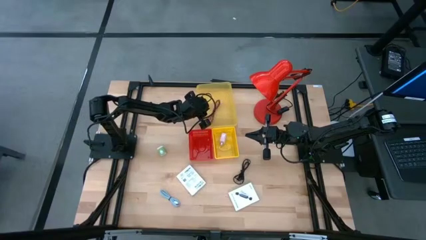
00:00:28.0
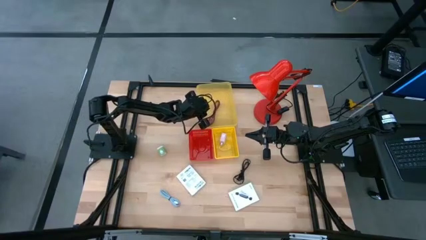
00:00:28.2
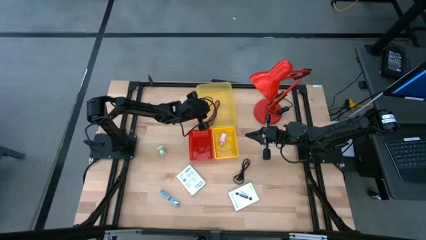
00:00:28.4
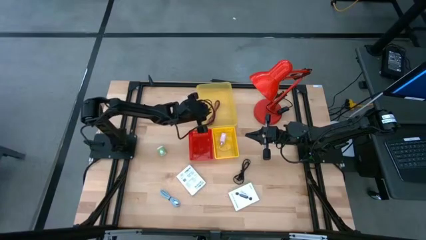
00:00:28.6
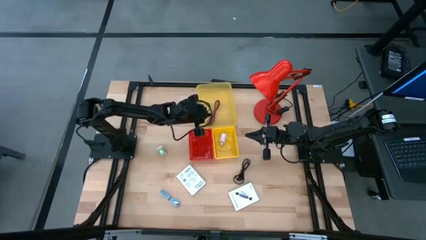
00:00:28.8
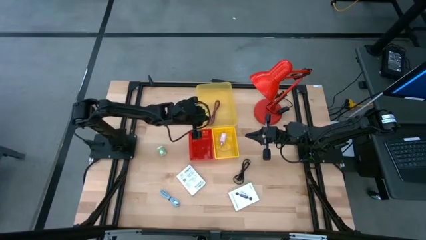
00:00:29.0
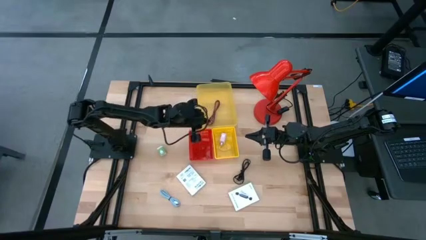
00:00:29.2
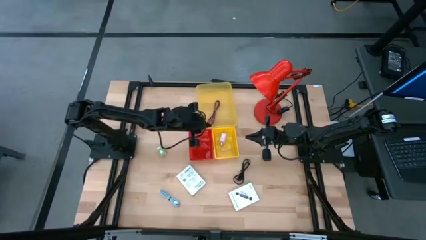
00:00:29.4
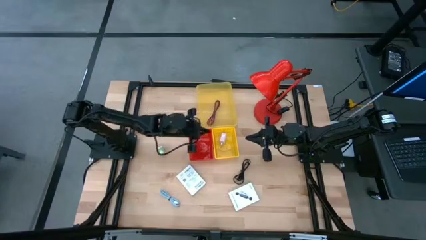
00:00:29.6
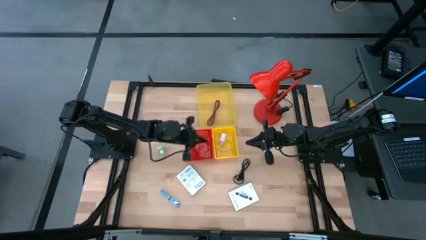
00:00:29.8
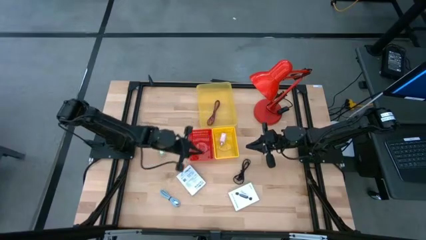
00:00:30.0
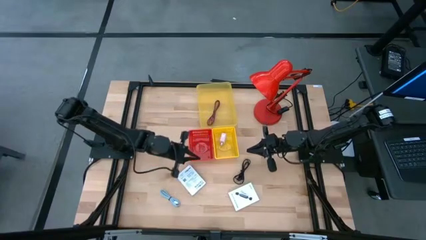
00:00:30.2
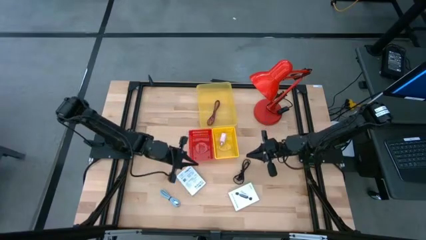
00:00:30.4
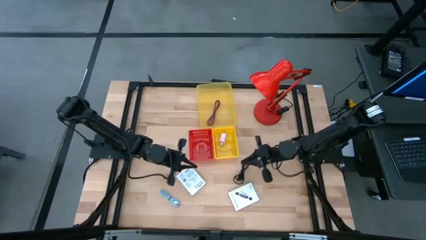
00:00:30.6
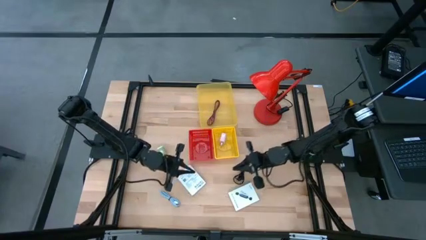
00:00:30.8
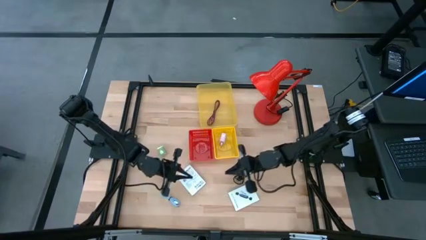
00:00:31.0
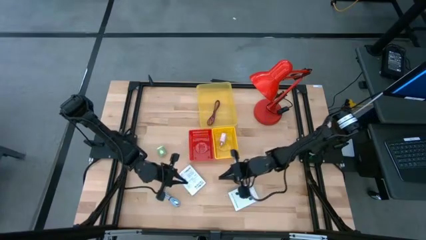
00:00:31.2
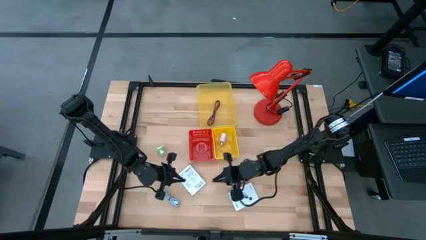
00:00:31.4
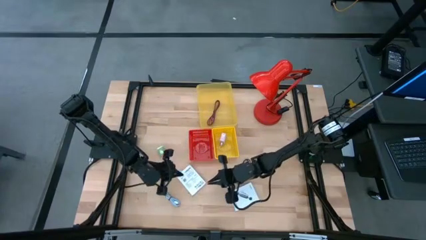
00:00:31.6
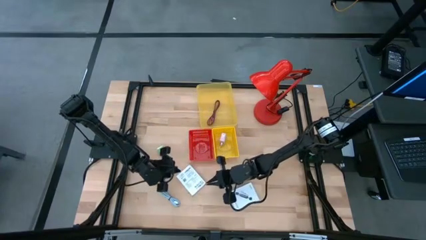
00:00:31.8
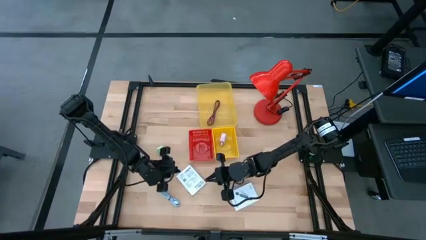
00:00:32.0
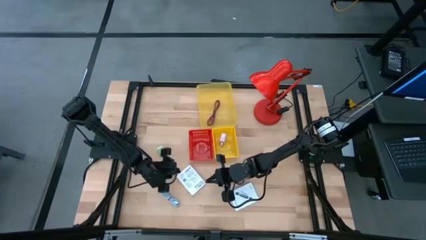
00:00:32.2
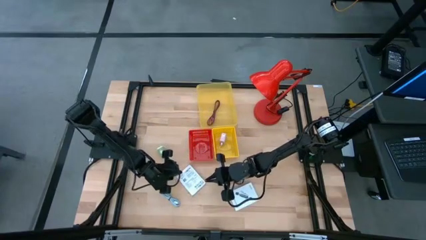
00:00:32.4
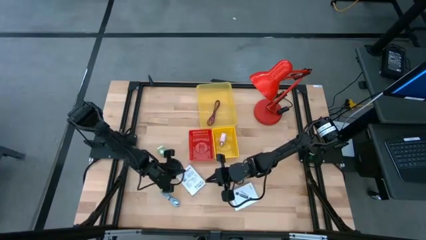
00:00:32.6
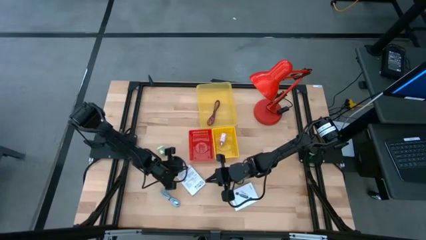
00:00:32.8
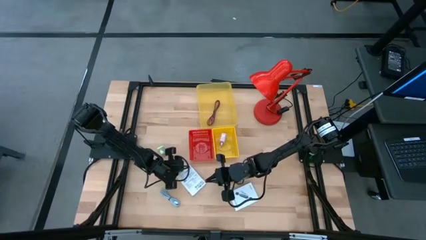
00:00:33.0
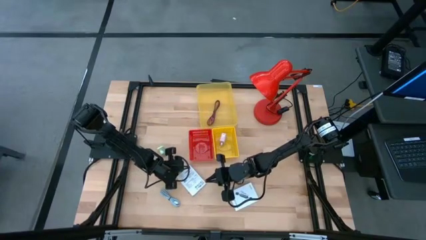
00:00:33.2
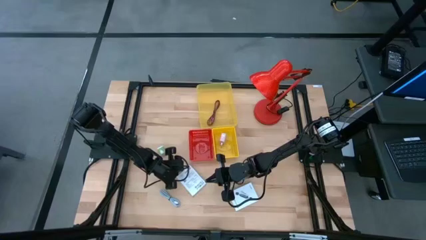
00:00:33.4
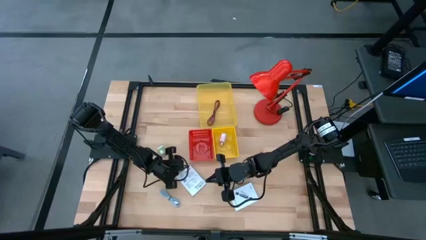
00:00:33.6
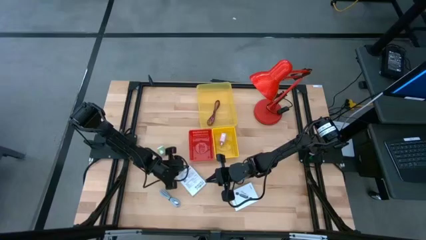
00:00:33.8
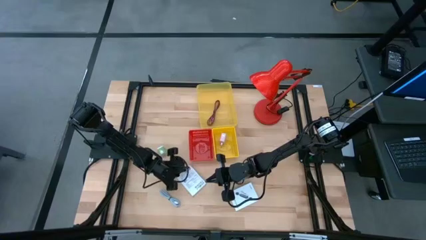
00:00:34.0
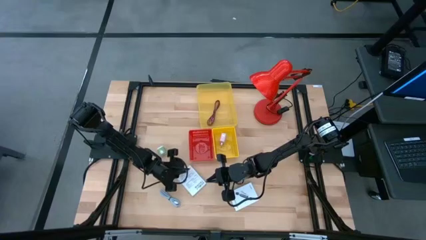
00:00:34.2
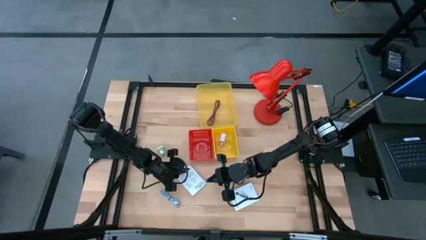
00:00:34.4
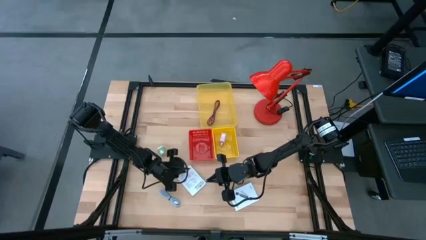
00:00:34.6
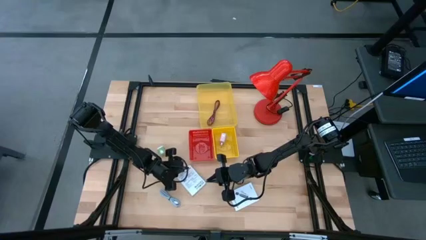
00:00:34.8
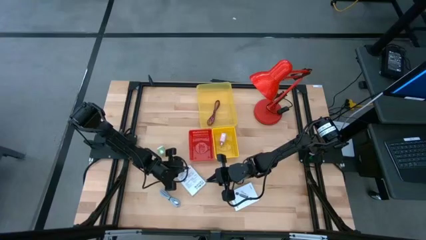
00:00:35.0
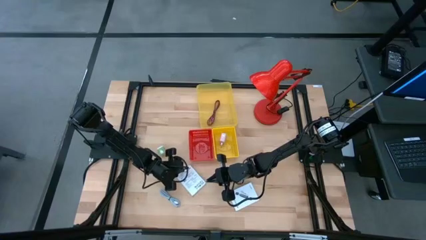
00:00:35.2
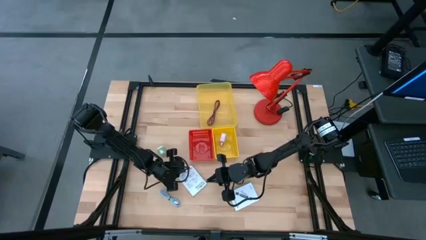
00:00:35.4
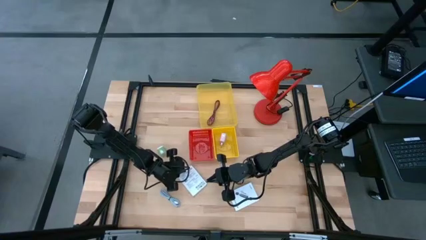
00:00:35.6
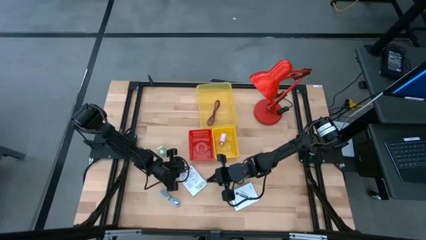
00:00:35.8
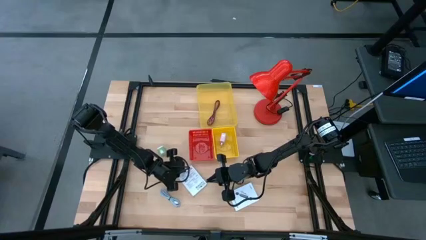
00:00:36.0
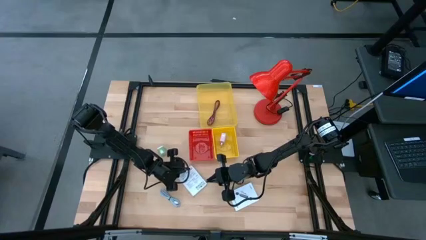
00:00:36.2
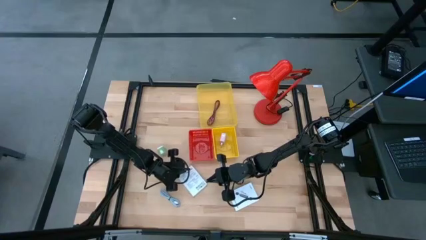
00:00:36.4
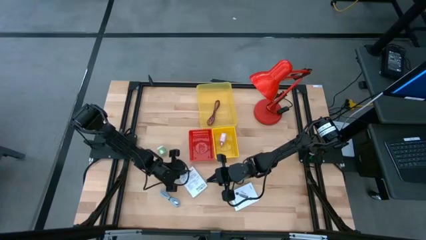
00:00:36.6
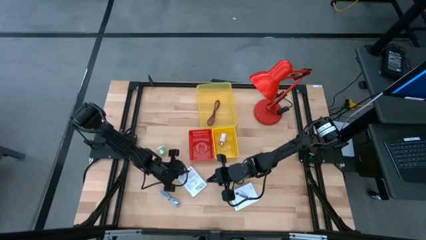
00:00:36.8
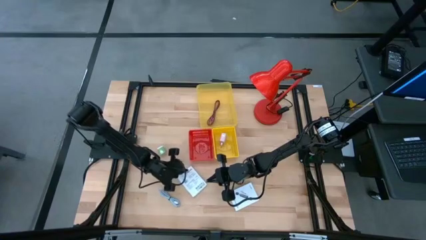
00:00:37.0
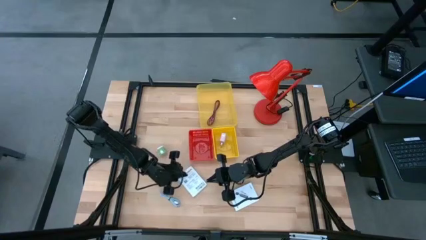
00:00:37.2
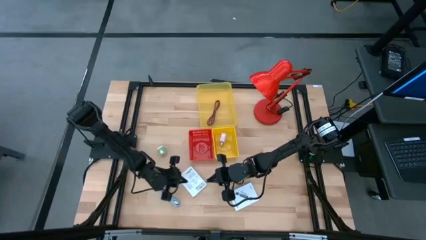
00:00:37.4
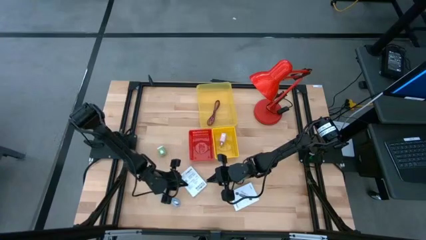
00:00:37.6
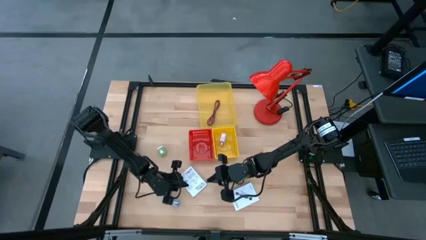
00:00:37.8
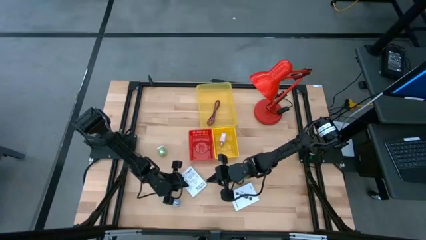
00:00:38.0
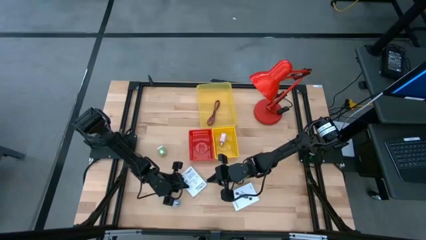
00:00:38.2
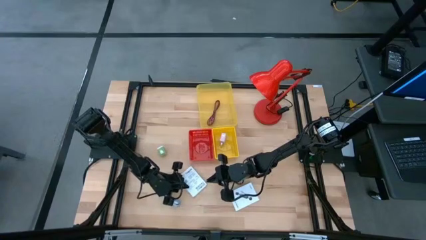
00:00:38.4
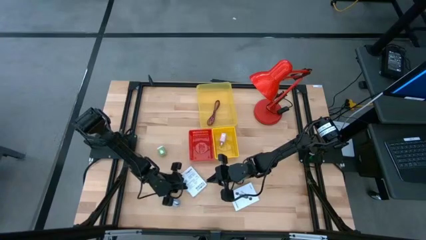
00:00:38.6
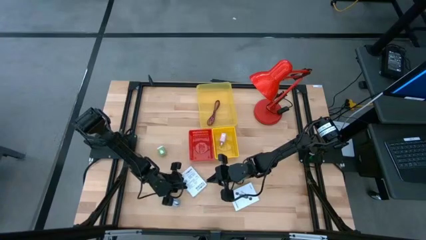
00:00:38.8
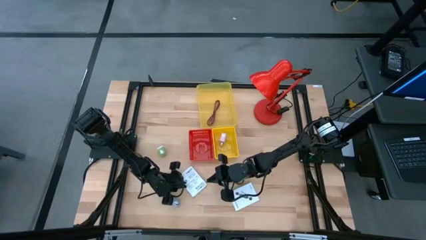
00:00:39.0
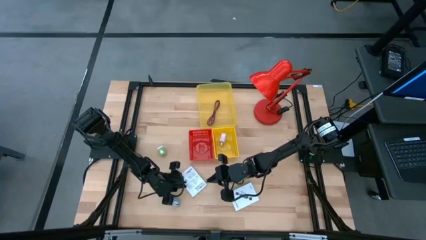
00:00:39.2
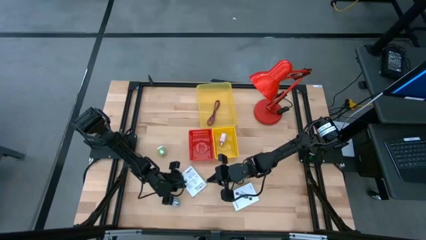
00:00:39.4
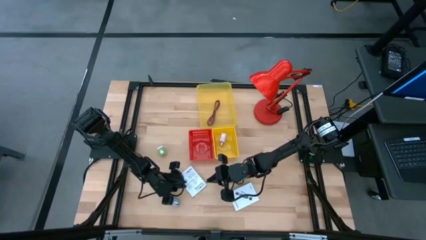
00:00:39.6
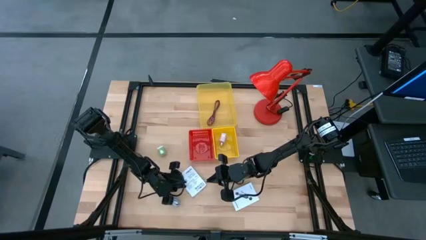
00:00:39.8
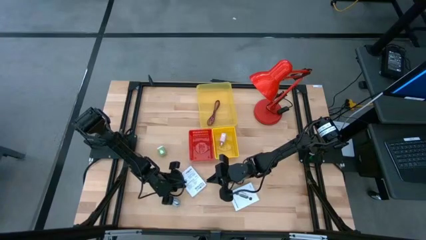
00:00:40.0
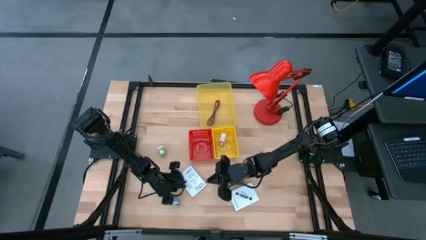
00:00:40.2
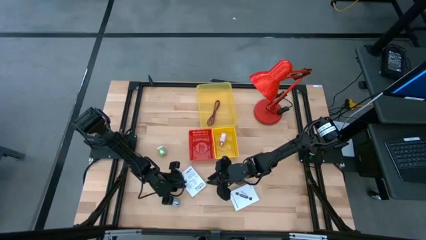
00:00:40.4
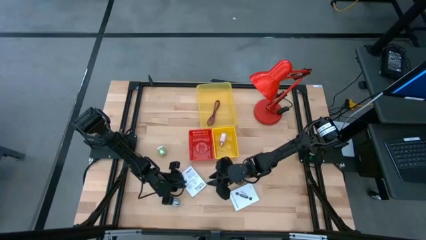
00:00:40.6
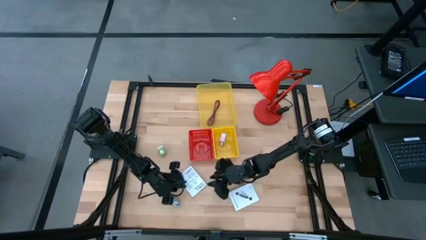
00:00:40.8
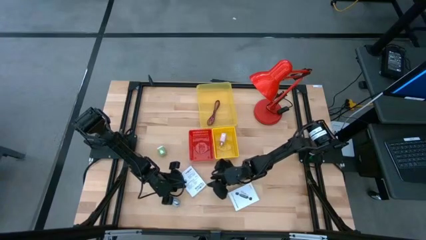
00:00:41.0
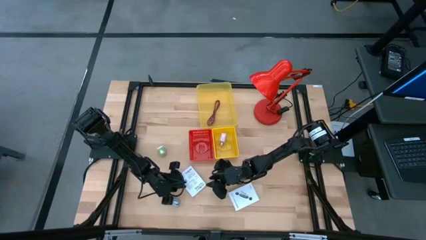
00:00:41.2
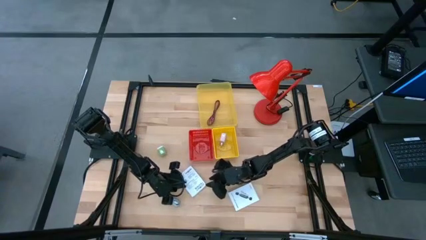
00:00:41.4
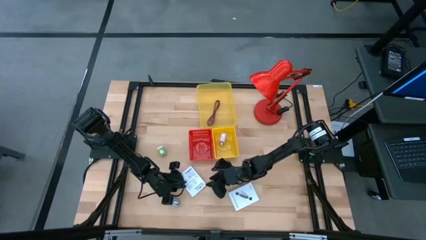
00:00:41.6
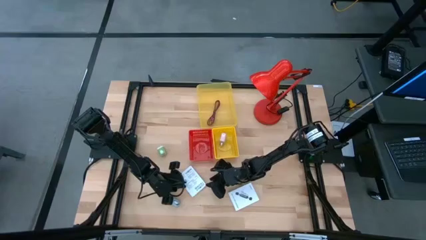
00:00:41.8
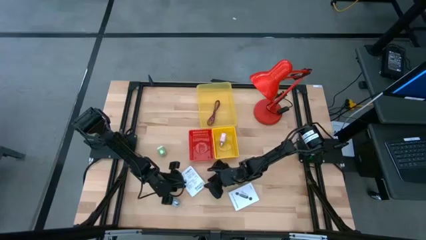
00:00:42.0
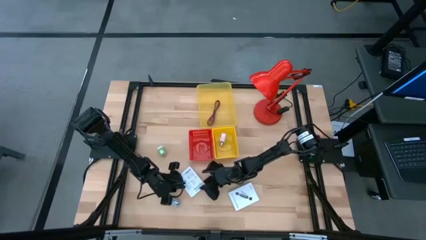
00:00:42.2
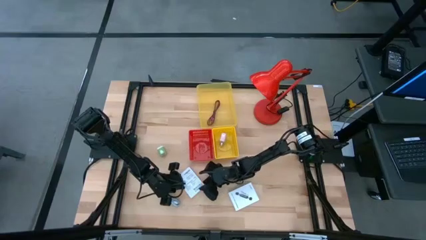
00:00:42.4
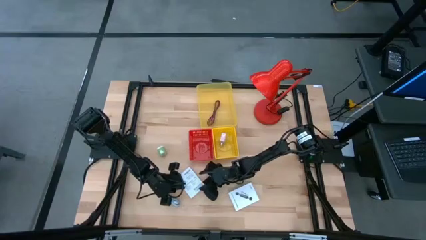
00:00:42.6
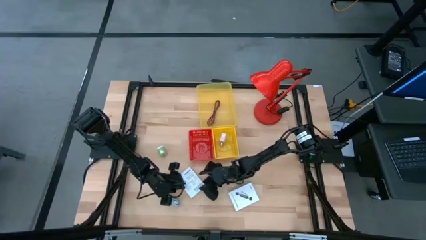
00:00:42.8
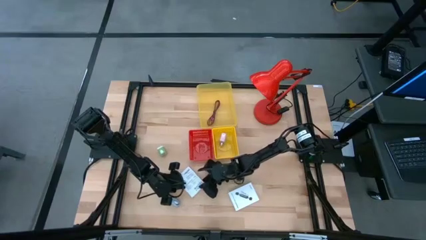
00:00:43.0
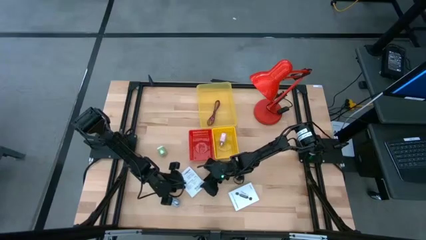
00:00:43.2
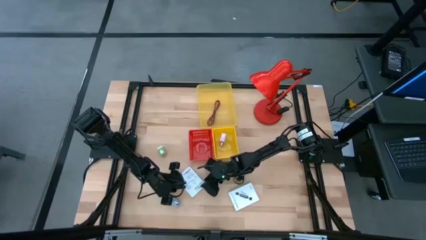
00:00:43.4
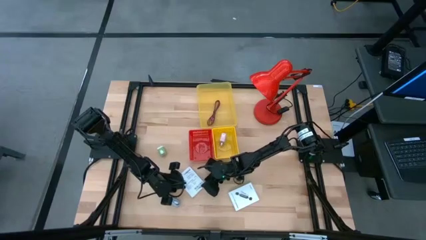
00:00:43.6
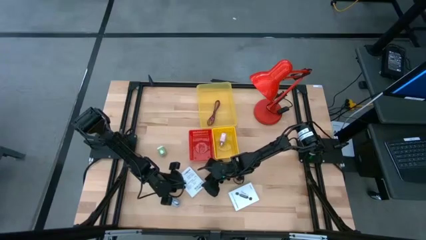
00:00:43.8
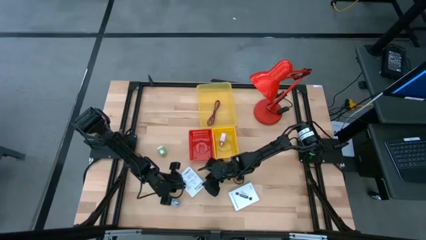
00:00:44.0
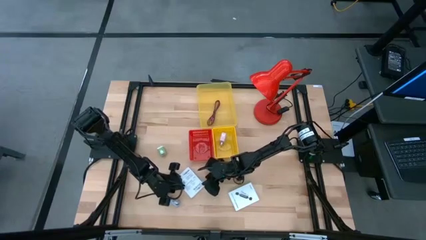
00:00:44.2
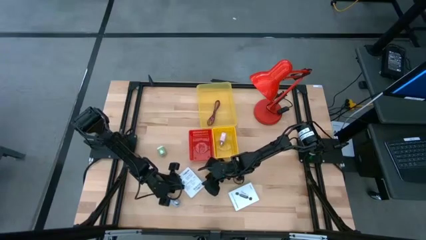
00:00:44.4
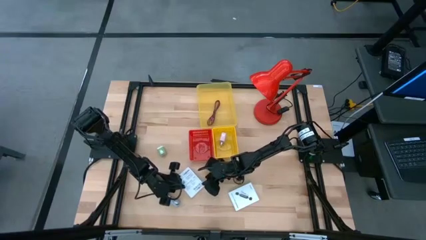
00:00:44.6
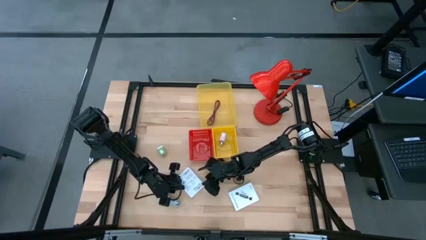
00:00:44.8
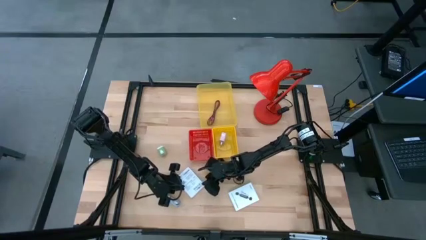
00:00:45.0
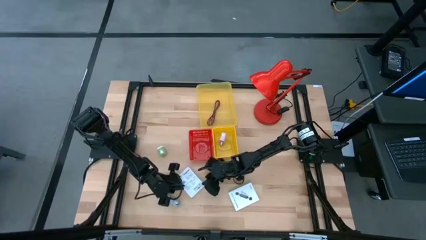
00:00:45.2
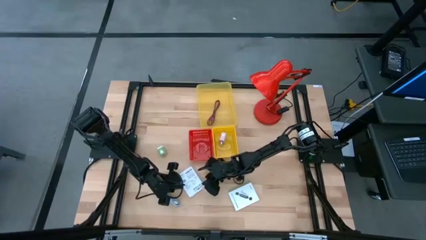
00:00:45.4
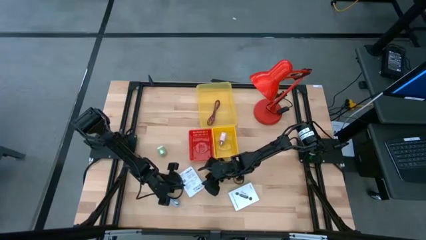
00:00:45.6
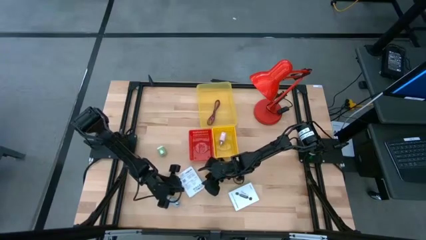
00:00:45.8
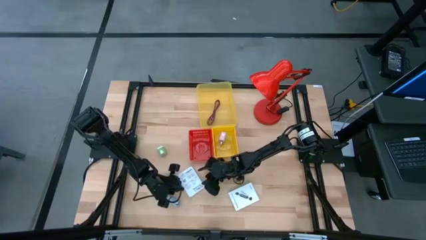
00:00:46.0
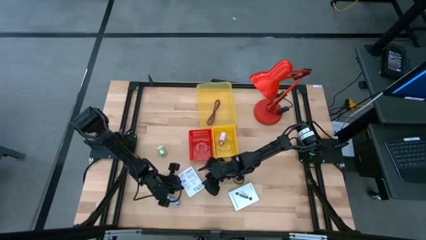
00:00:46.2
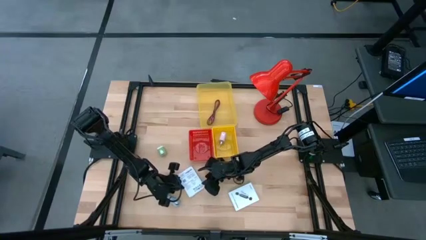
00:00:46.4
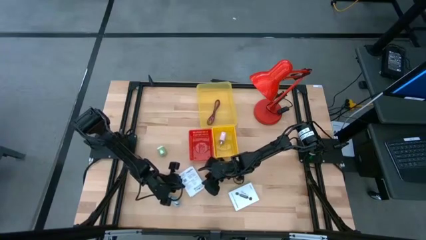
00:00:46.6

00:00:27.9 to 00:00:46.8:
Task: Pick and place items into bin
Put the left white card reader box into the red bin
